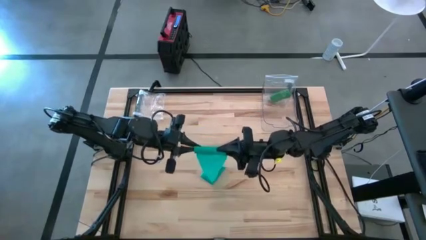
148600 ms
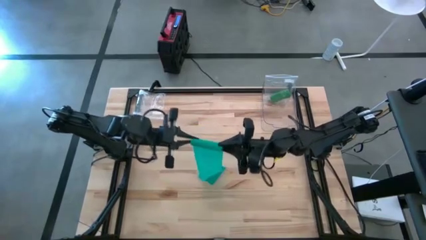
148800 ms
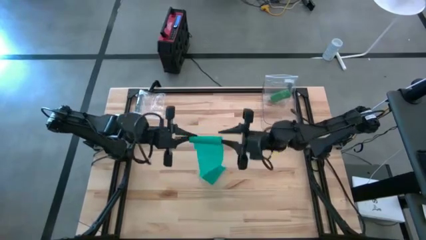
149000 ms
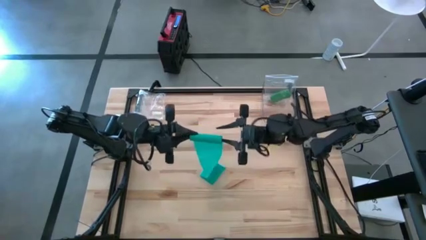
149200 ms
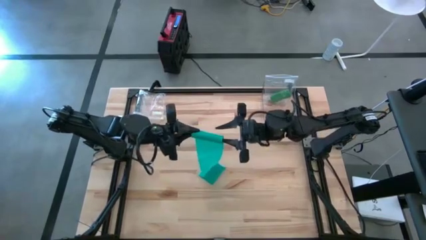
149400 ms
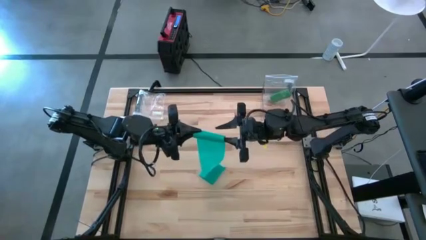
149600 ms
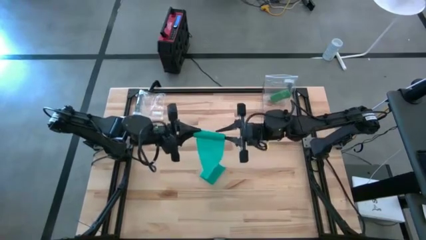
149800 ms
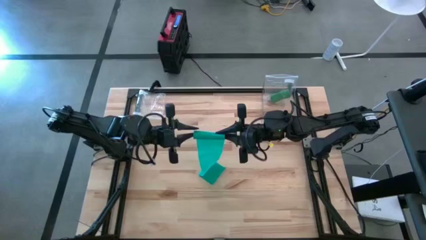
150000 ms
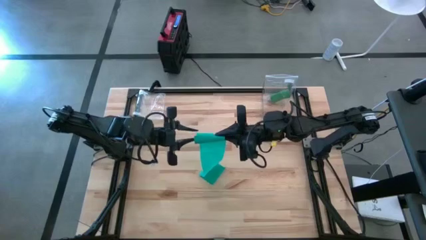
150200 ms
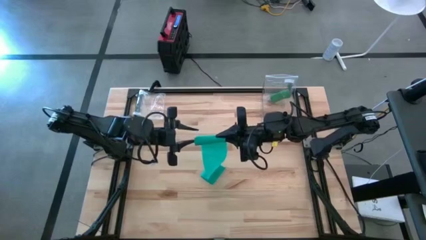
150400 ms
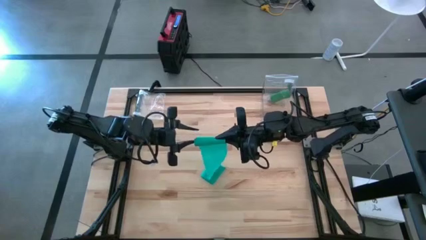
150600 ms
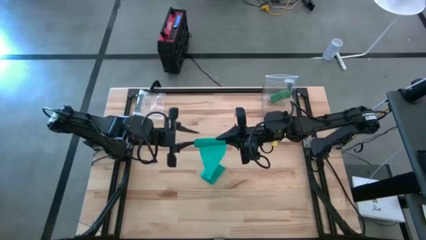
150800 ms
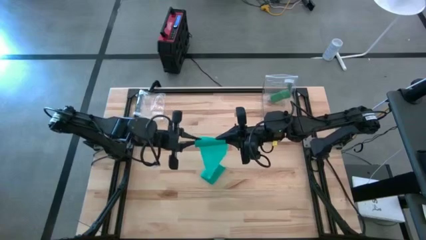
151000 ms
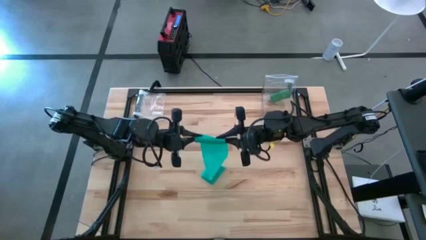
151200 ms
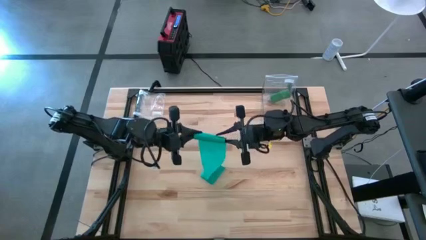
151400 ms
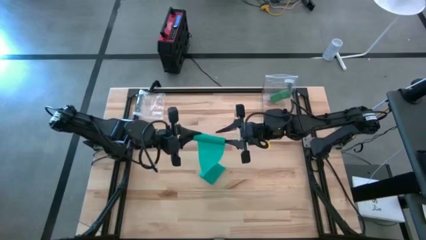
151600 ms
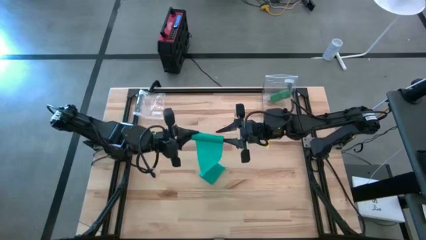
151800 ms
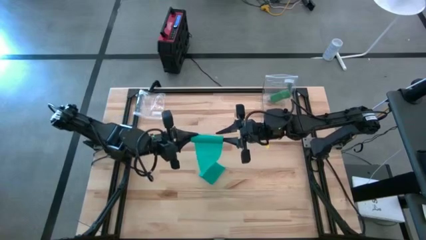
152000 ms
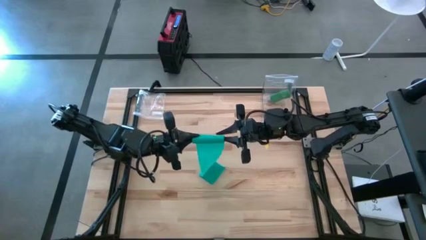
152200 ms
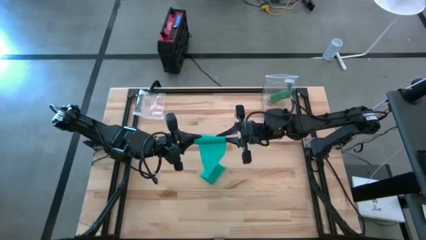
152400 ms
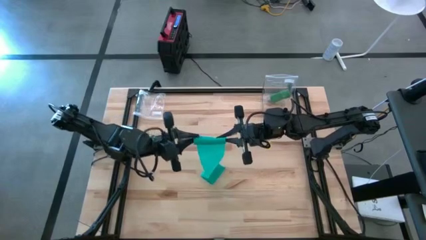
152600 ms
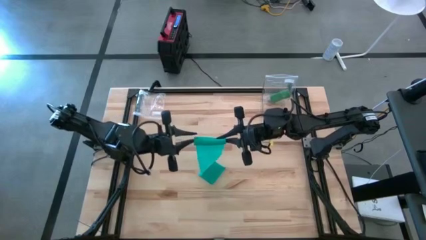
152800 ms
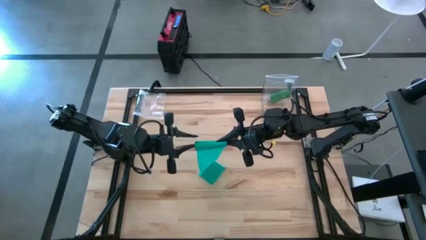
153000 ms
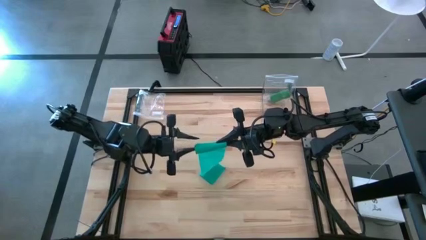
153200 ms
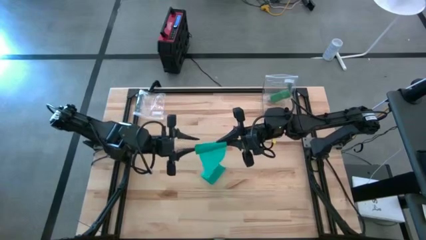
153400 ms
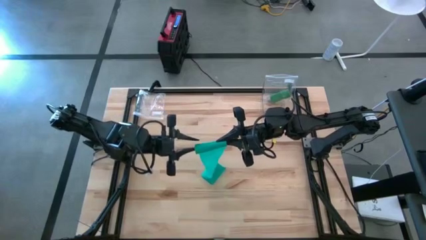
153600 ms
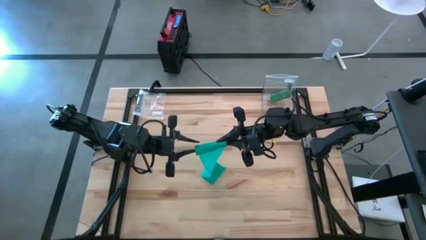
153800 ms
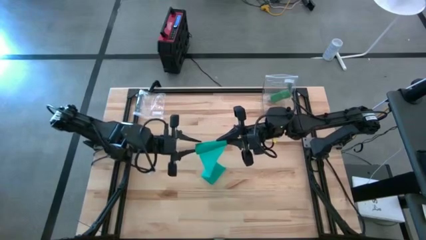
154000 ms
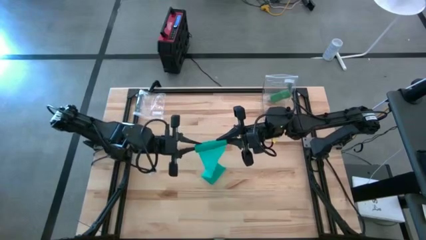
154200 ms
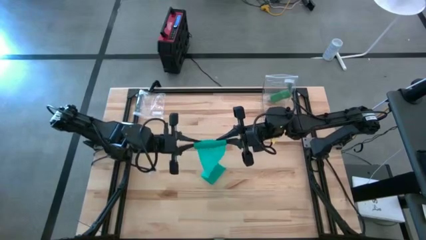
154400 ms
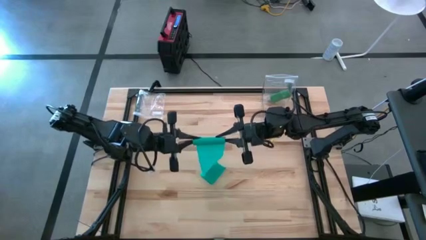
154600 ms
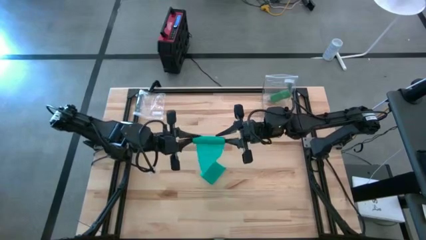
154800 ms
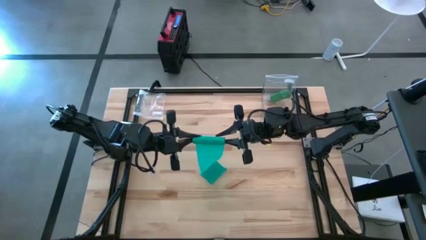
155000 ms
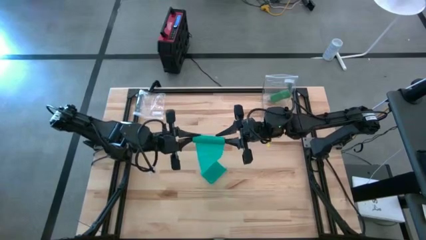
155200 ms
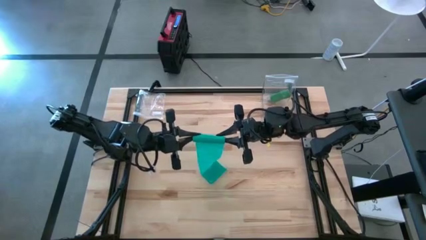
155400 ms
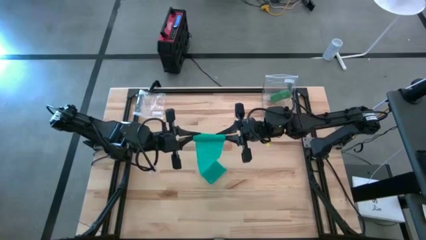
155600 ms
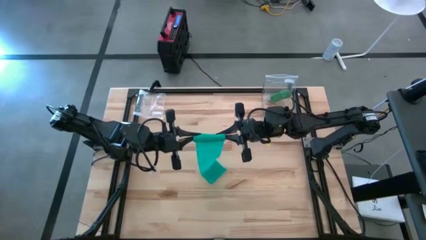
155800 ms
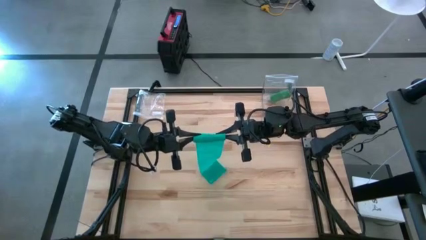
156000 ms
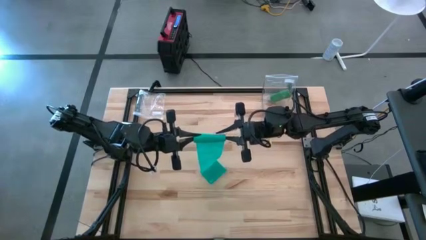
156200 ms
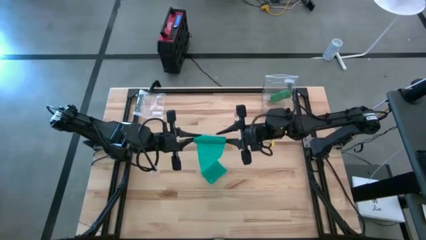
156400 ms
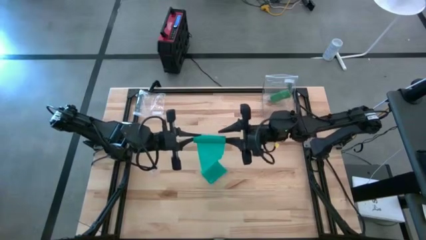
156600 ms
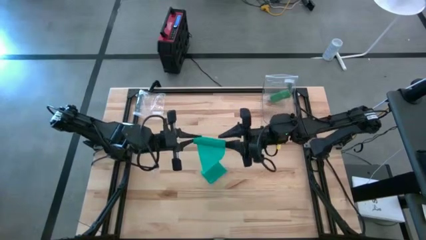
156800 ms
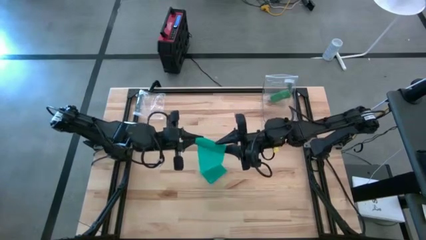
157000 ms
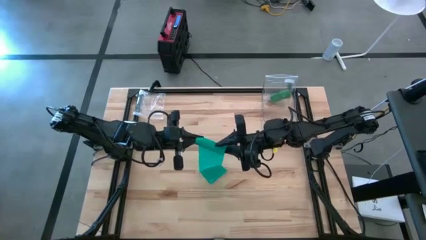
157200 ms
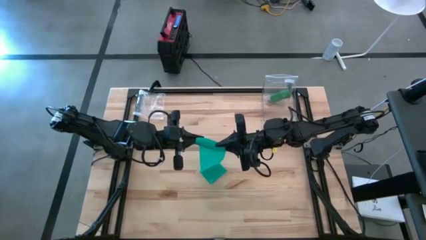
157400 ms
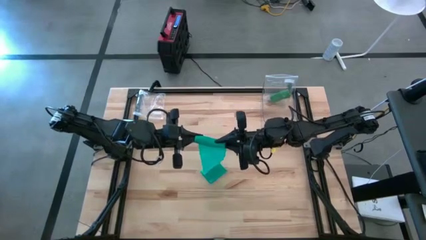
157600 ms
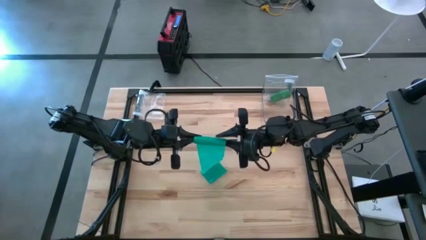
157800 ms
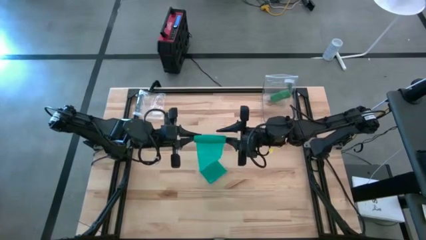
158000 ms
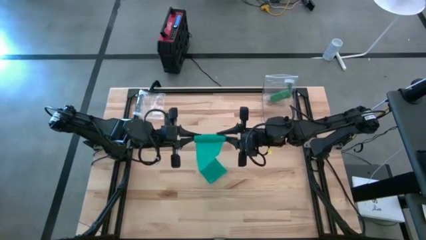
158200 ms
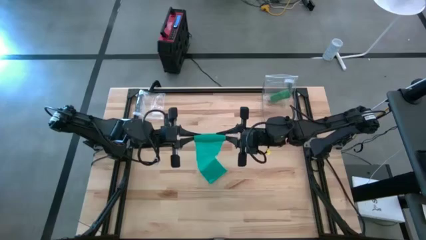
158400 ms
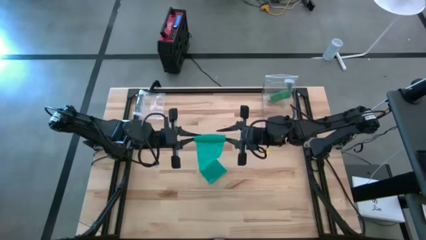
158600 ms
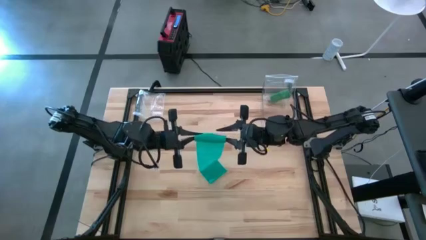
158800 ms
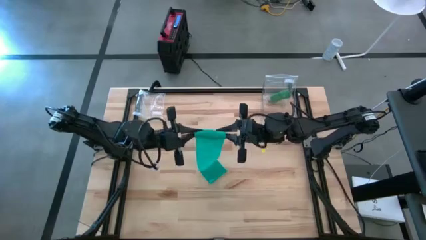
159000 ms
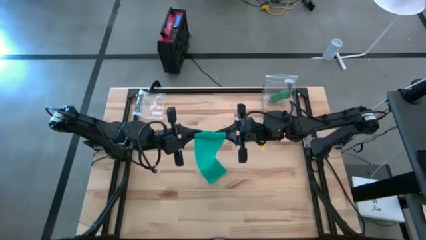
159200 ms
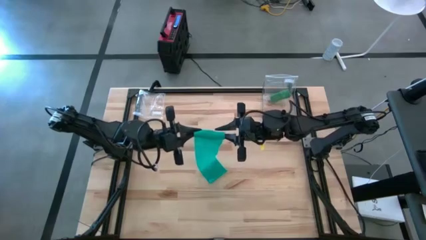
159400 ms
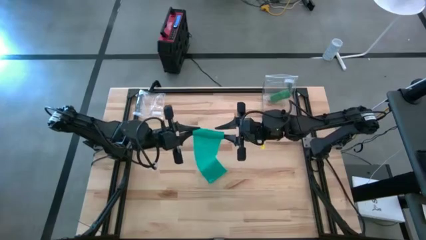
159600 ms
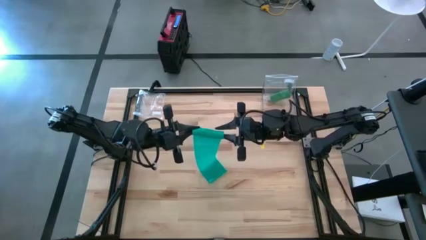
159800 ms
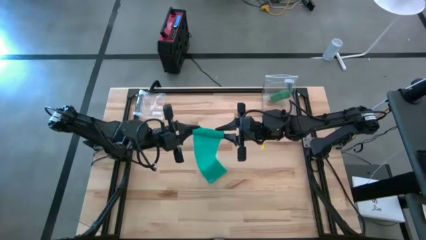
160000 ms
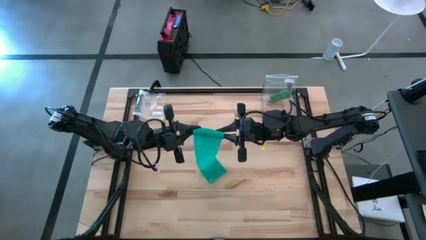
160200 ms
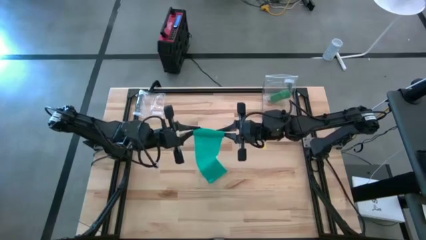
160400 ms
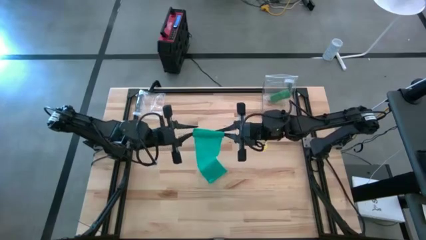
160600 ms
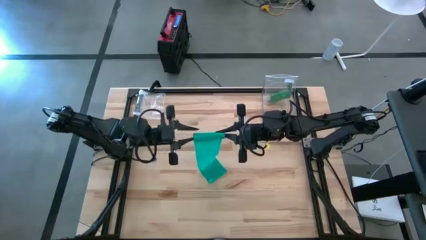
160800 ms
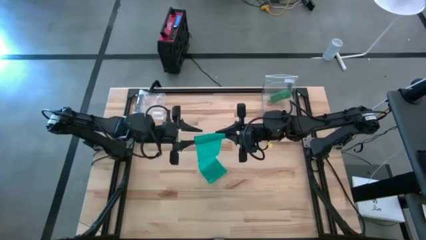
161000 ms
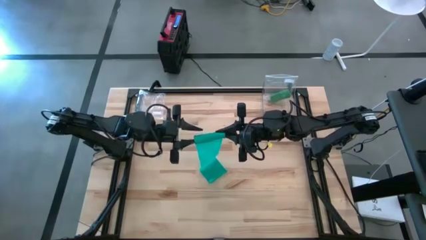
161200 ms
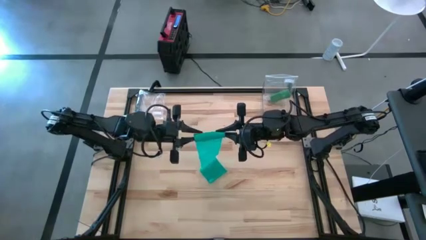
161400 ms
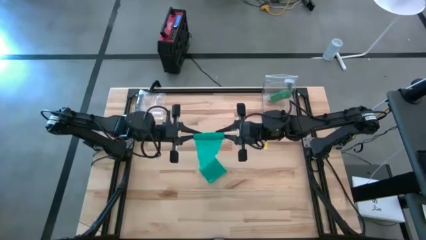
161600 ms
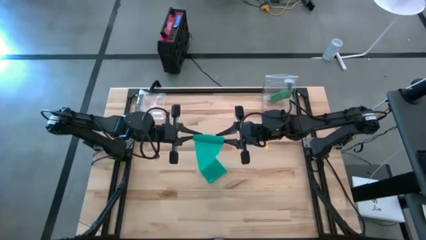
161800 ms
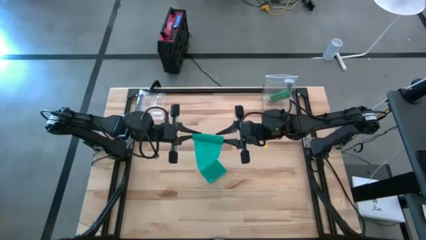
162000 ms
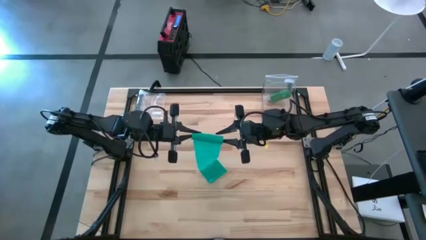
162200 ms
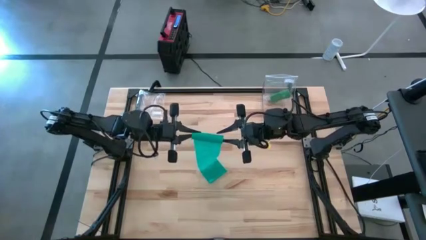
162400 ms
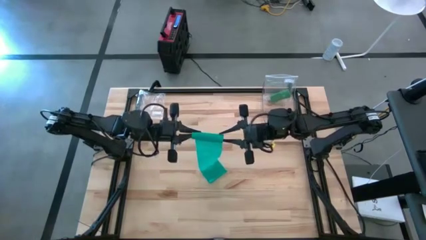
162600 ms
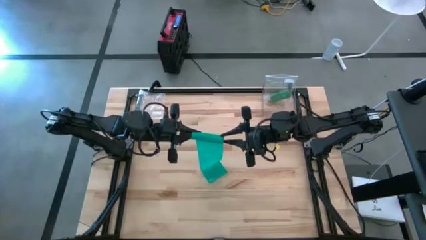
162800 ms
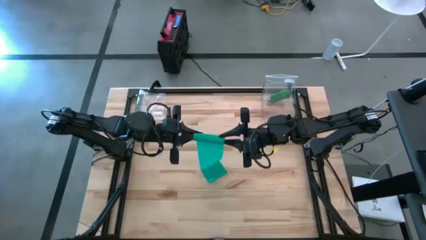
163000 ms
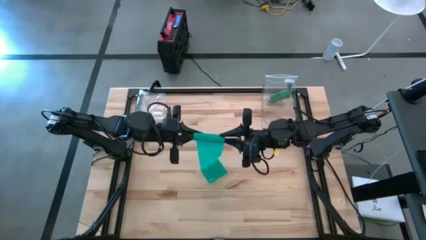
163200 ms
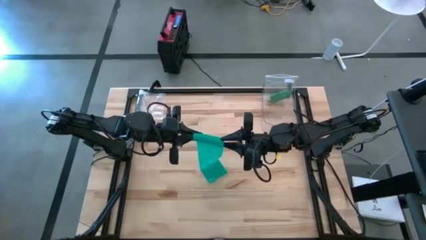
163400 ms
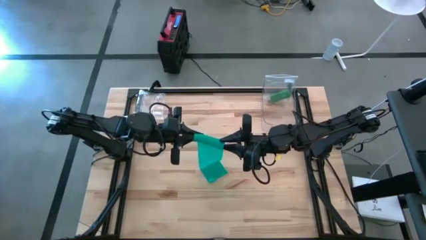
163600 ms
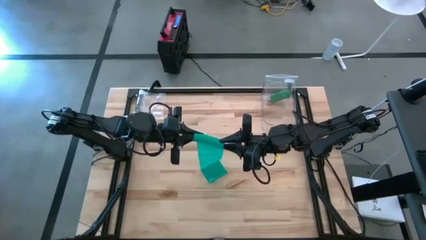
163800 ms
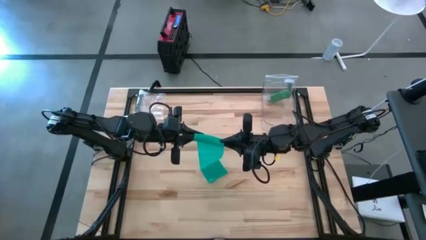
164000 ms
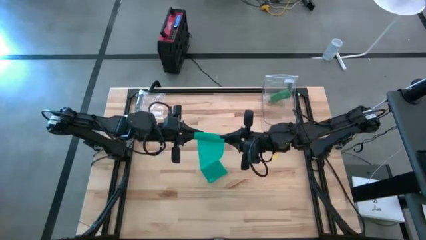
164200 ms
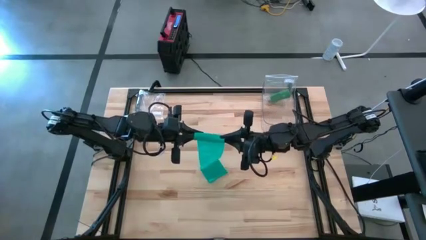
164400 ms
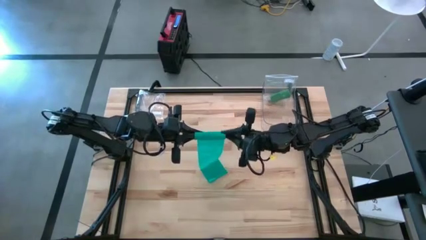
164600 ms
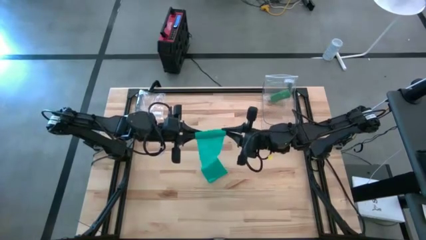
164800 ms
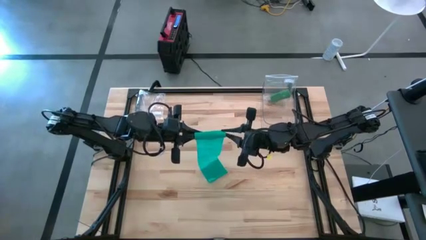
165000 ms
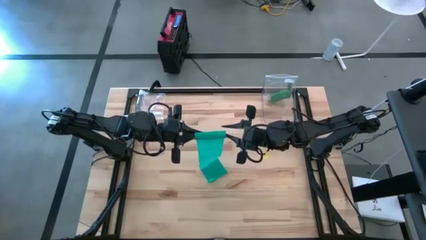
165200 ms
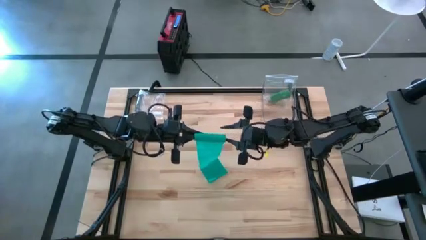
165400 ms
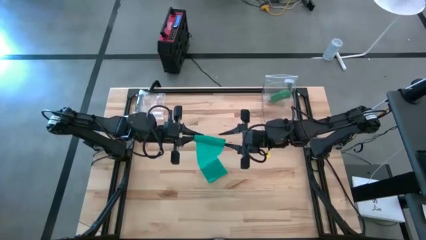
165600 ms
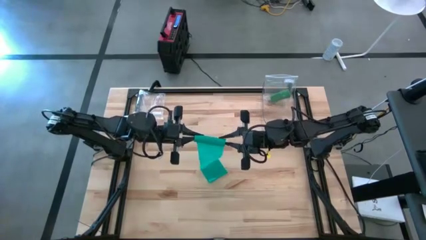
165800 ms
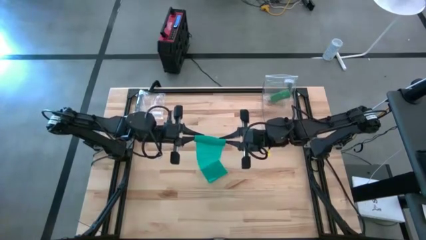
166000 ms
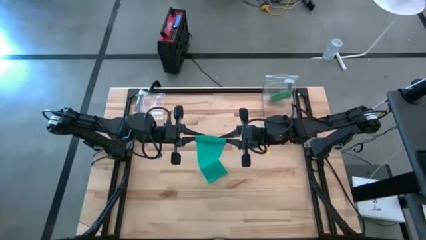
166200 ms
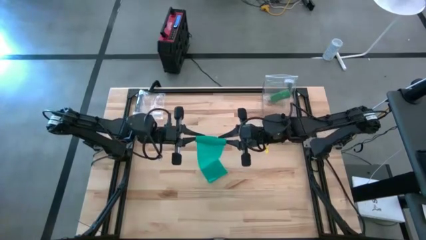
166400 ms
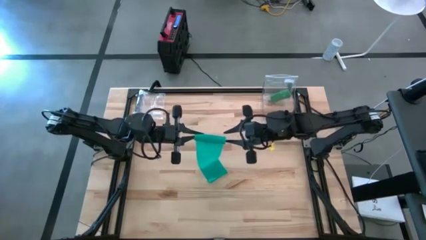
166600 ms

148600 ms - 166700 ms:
Task: Roll bandage
Roll the dark green bandage
